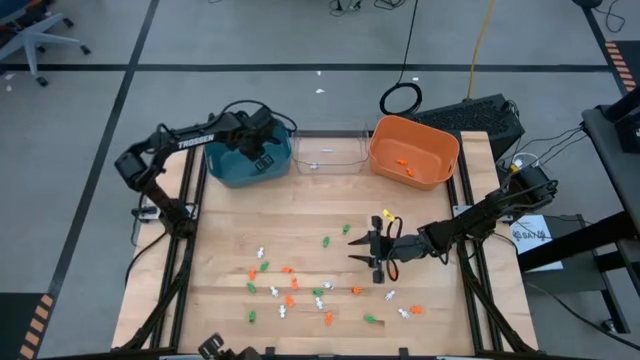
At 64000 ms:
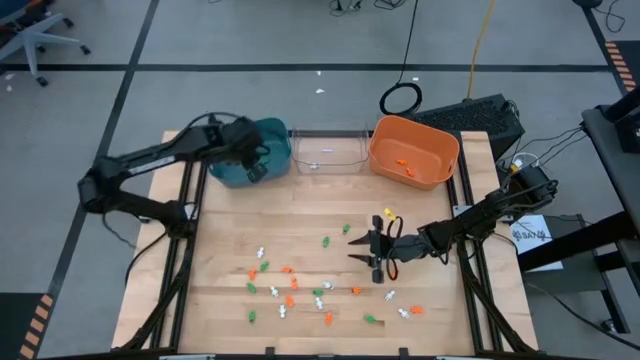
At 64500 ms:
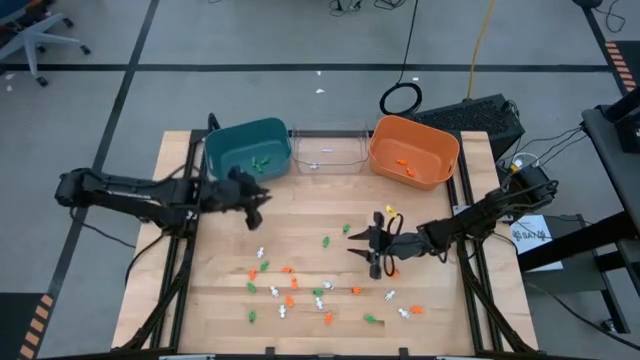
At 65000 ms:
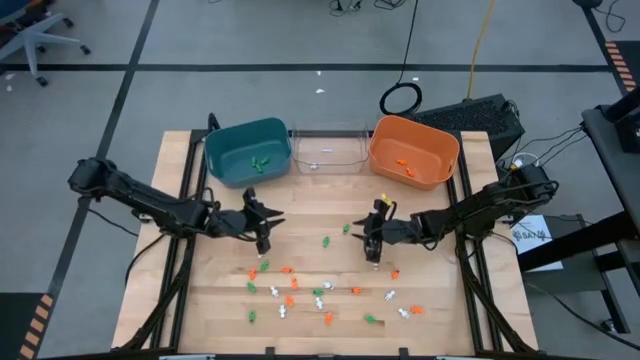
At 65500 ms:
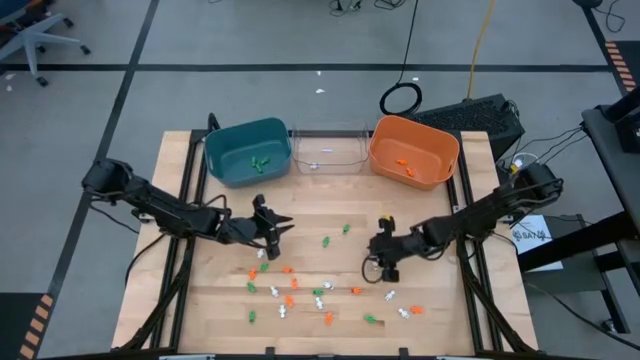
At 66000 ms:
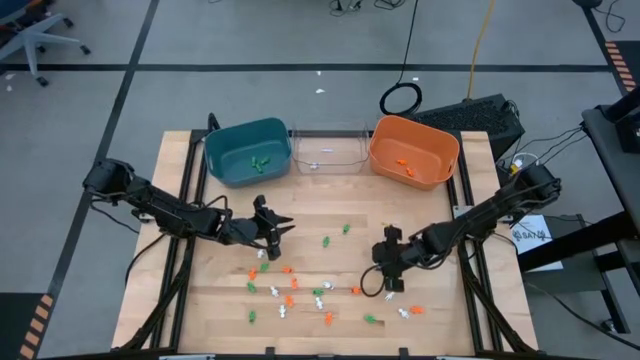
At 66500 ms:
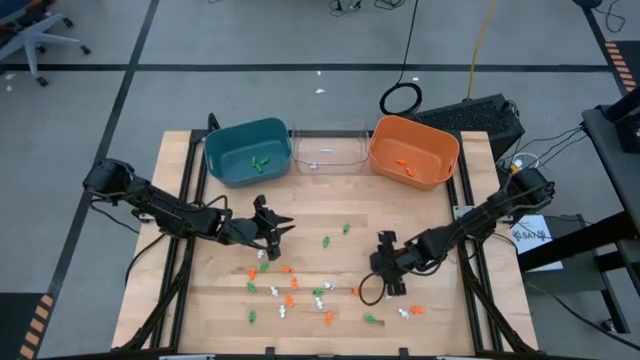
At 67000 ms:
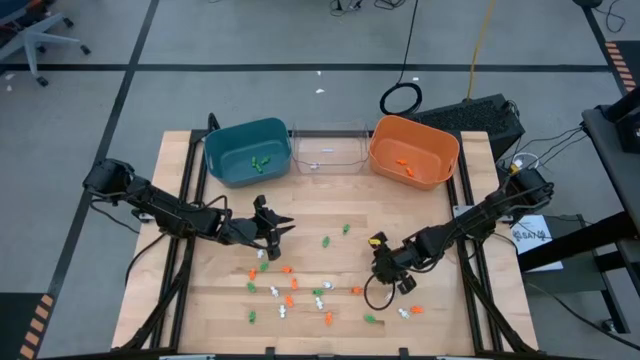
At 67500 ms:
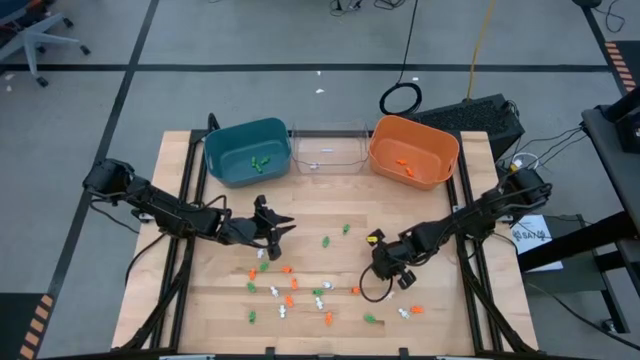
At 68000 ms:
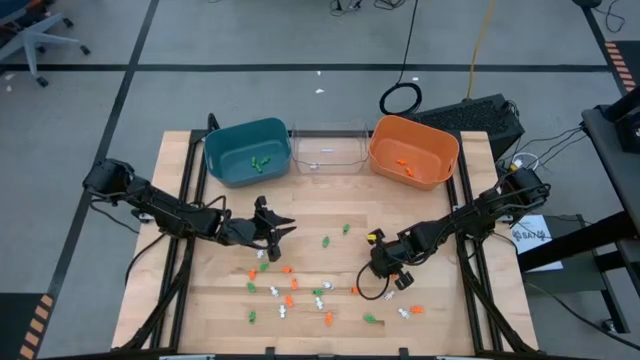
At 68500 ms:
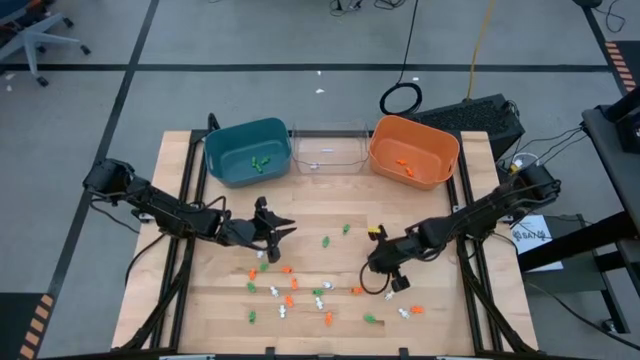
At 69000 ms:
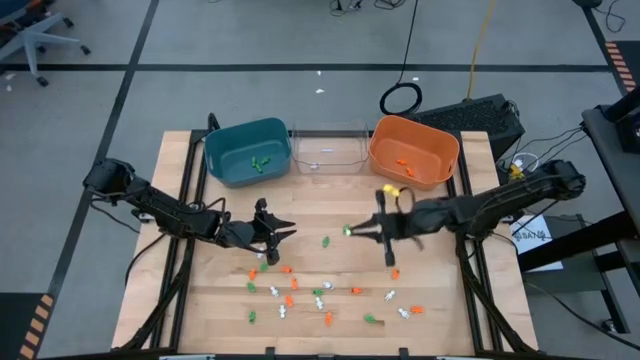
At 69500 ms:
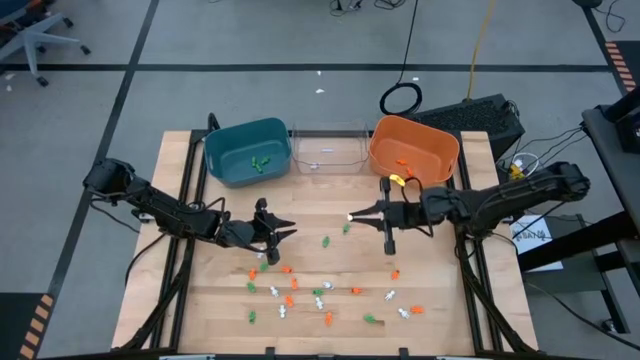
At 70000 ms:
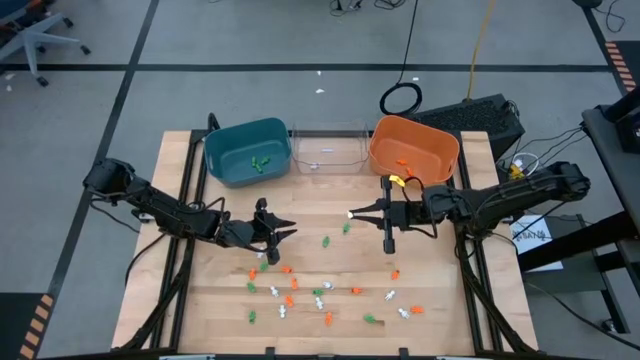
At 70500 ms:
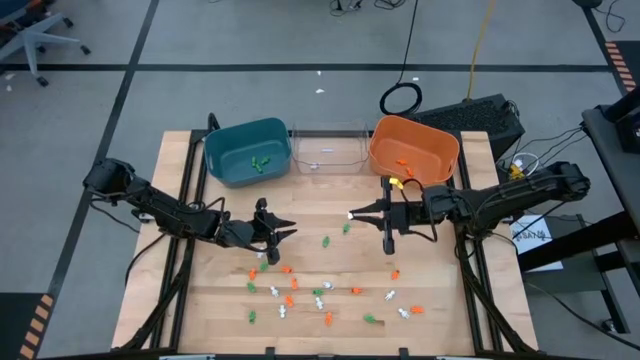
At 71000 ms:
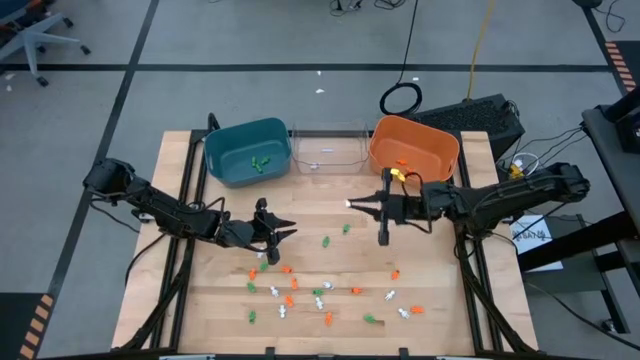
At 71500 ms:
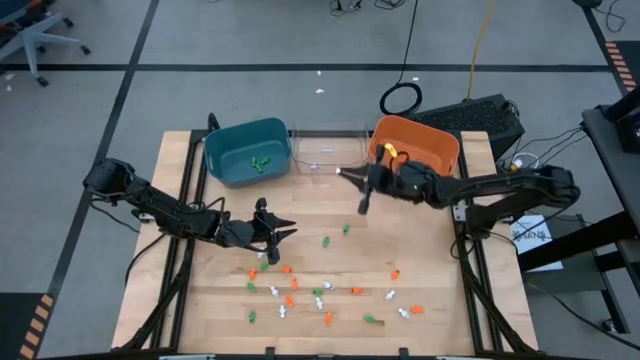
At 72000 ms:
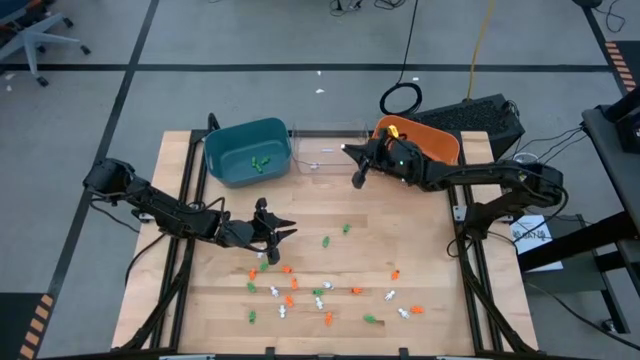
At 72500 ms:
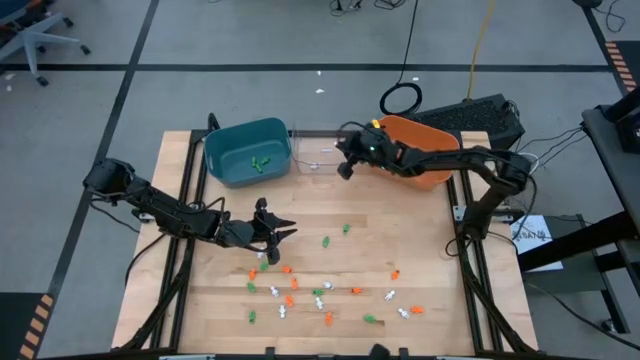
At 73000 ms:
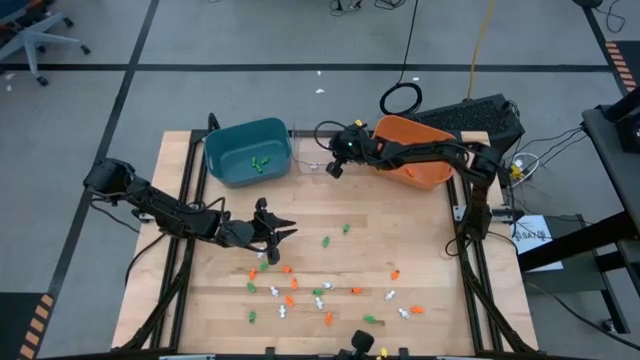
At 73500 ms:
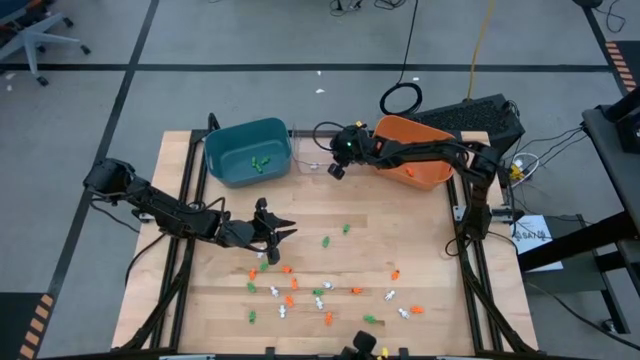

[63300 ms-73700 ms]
Task: Sort Halloween decoration
Put the white skeleton toy into the transparent bin

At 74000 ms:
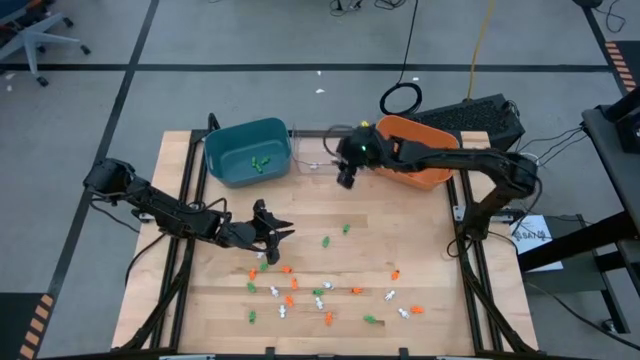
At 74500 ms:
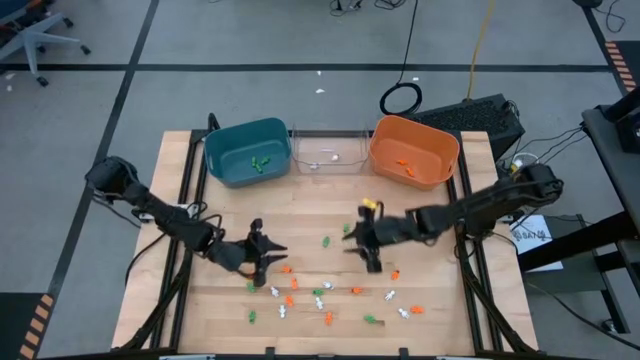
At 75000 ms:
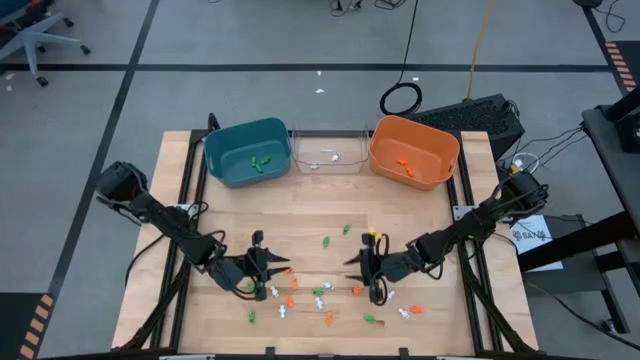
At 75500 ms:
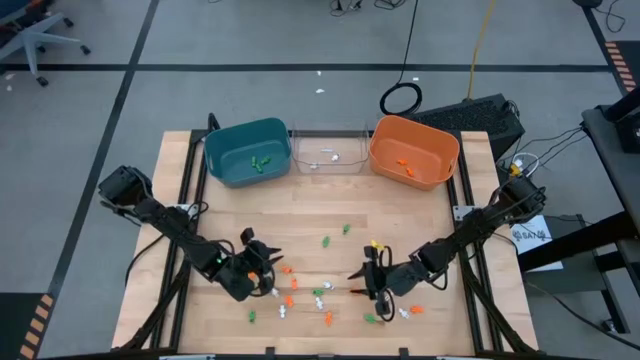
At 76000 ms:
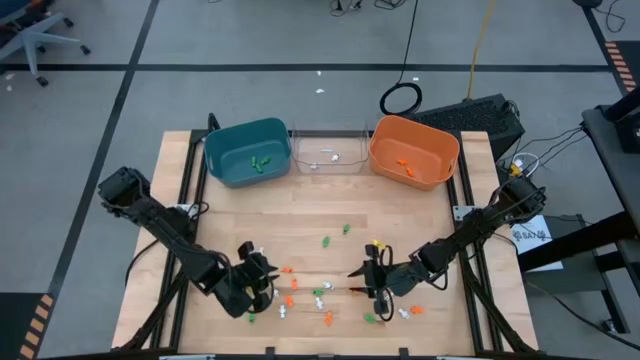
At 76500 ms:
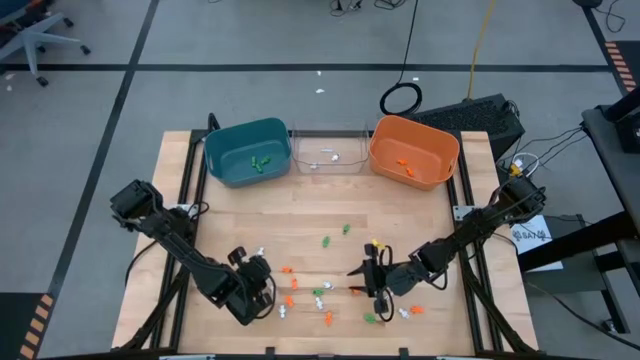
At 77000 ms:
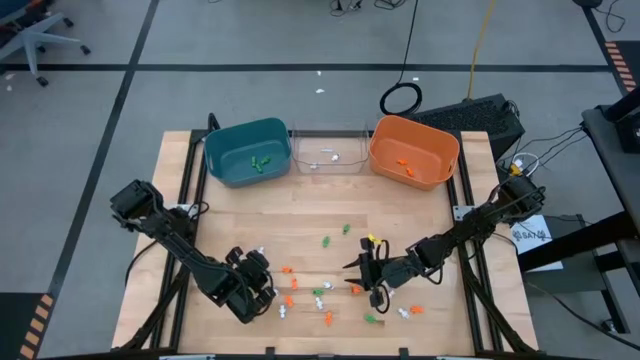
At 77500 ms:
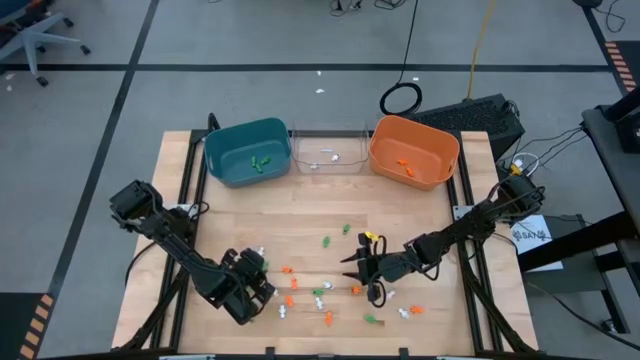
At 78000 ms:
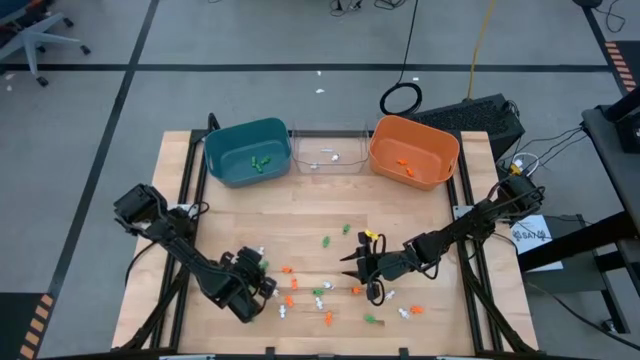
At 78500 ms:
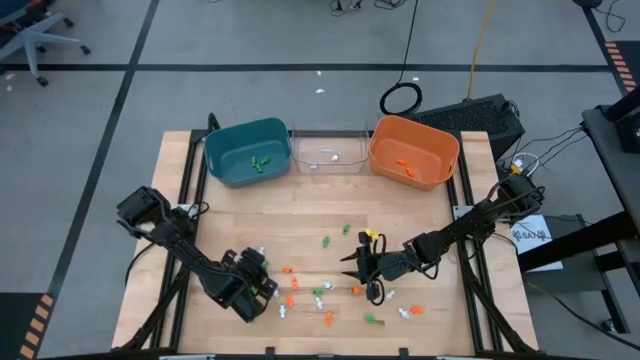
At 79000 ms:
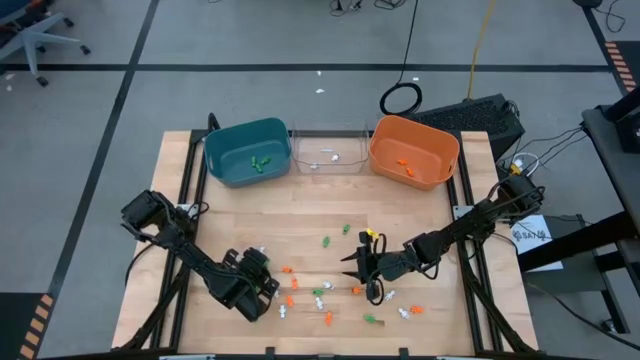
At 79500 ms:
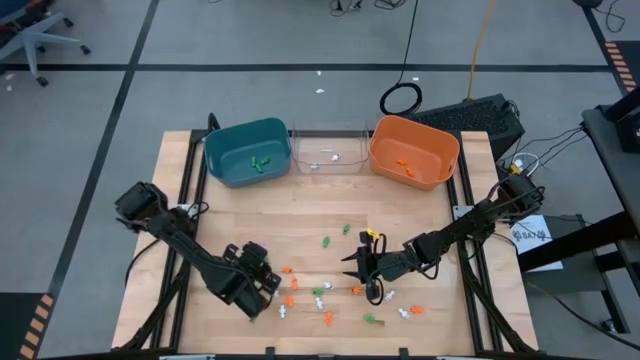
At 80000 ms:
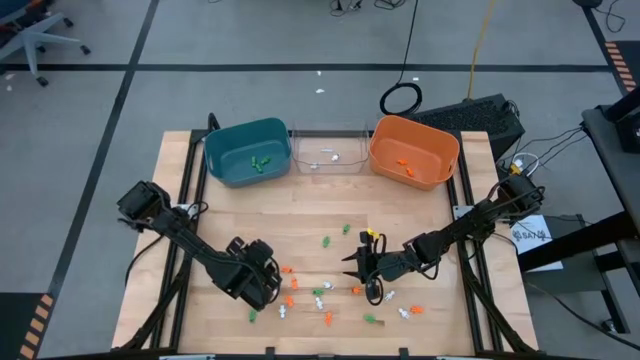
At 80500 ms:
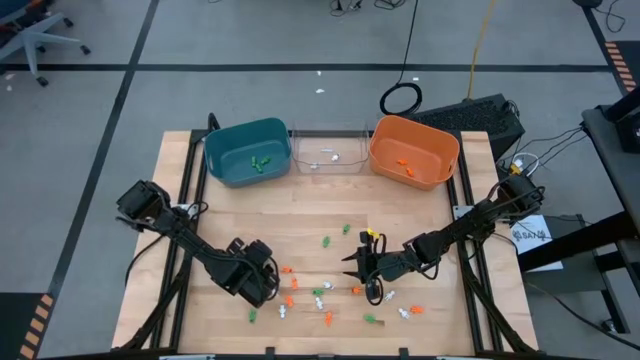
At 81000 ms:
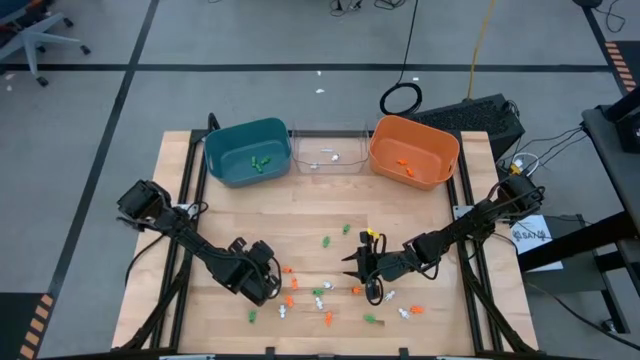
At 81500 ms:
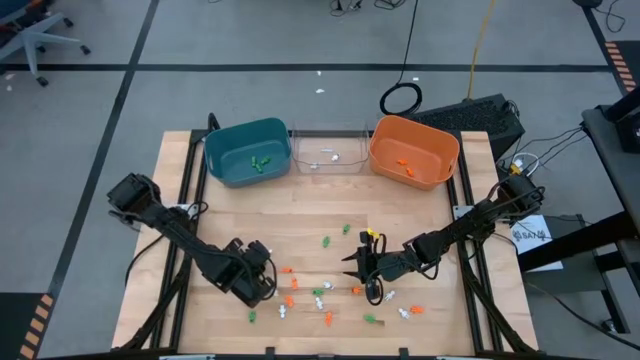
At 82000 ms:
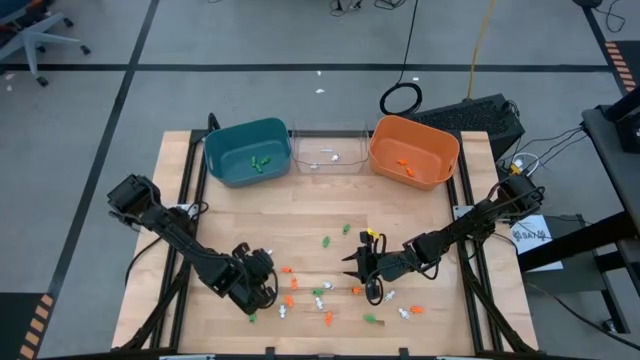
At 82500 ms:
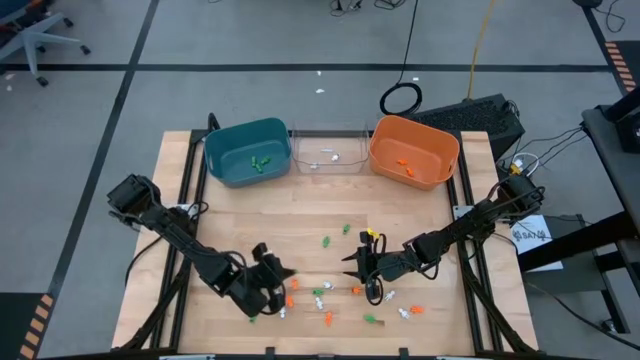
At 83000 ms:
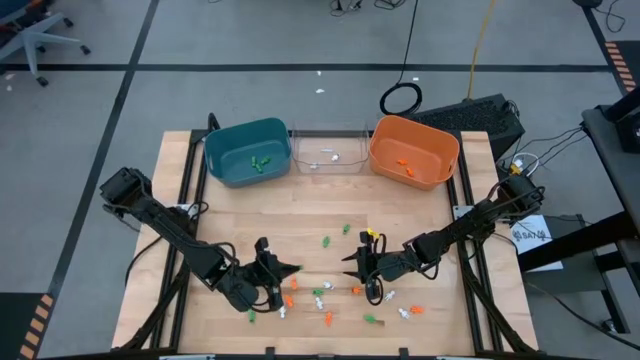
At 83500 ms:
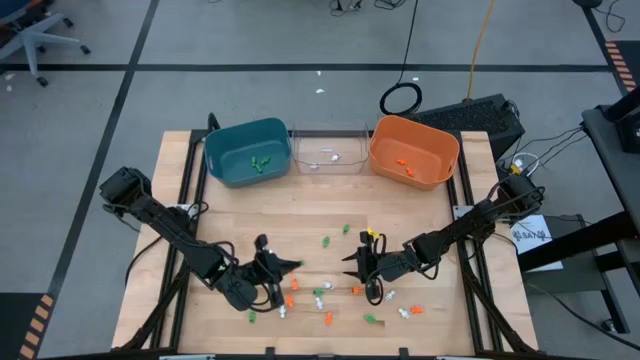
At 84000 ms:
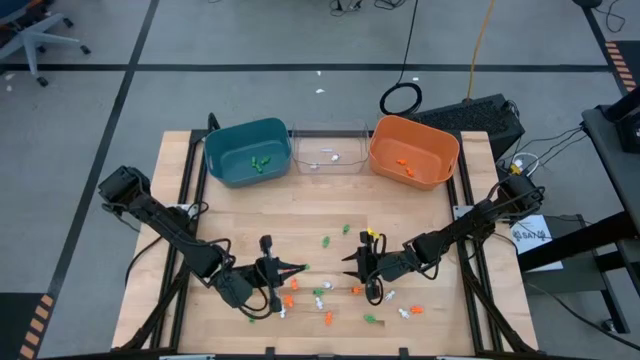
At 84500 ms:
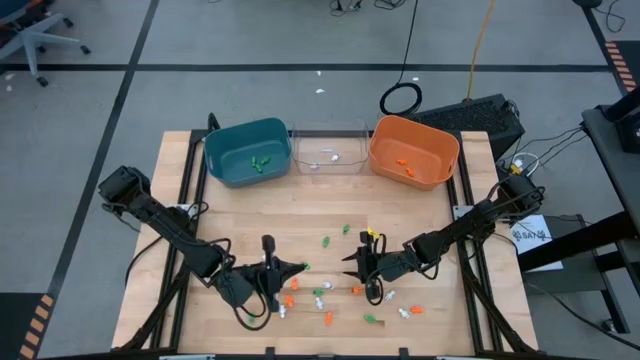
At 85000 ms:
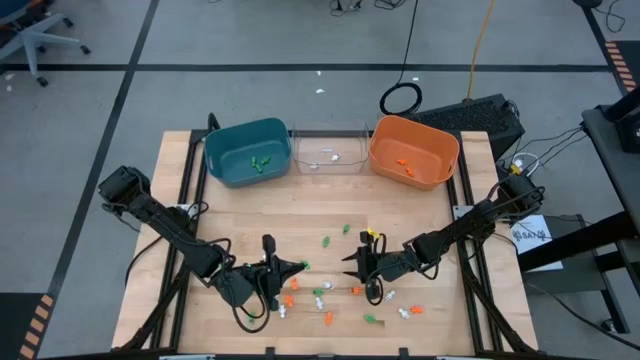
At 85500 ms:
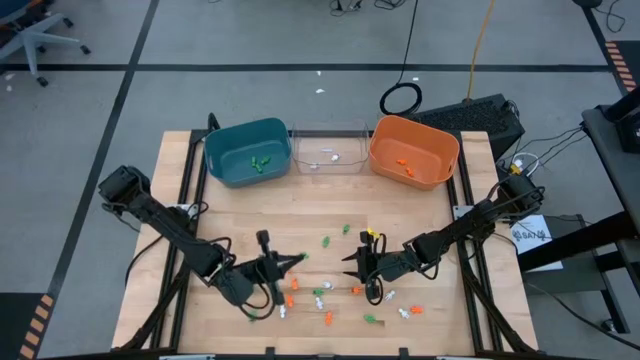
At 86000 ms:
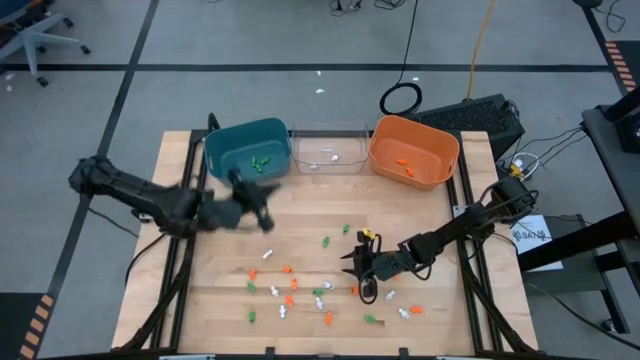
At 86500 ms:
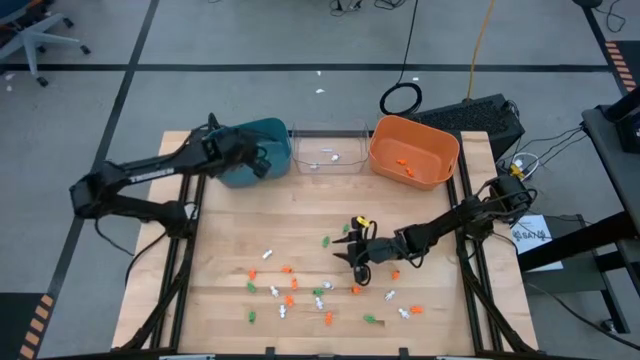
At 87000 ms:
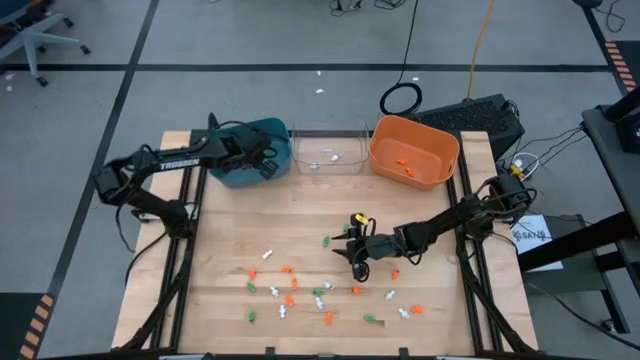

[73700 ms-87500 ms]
Put the green skeleton toy into the blue bin
